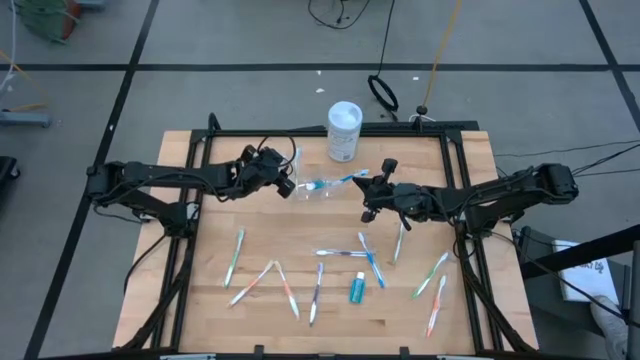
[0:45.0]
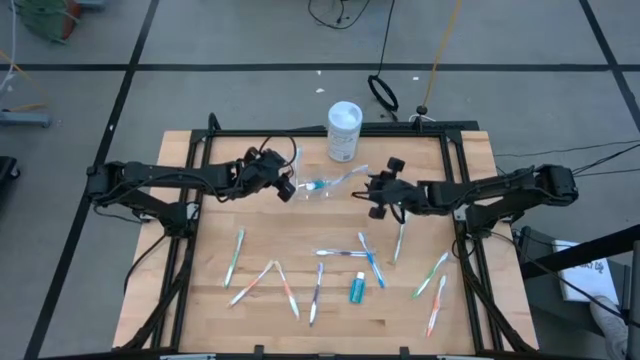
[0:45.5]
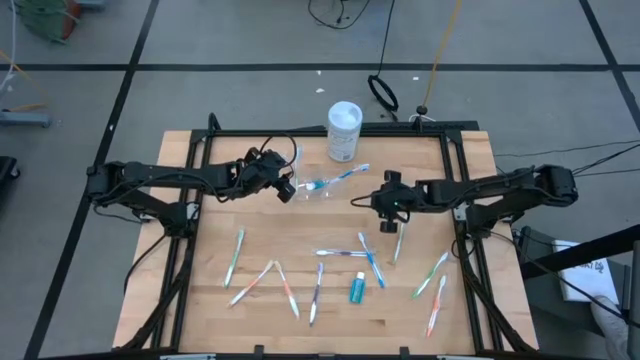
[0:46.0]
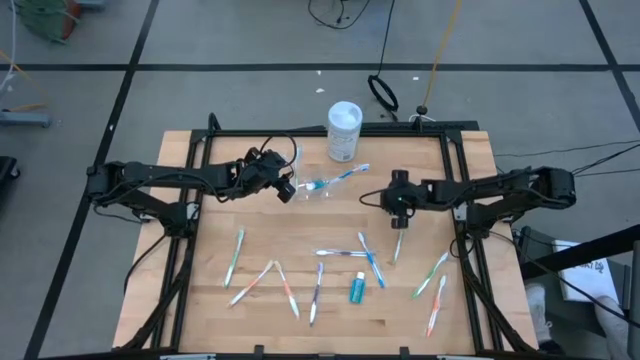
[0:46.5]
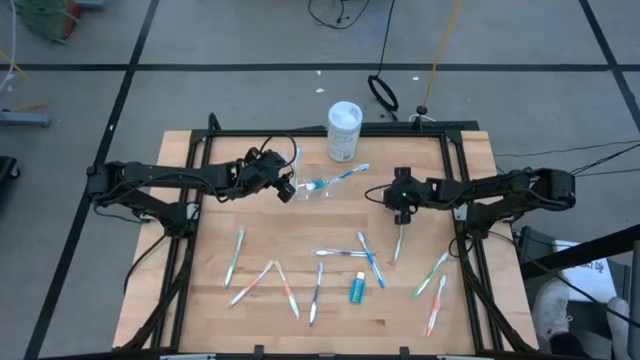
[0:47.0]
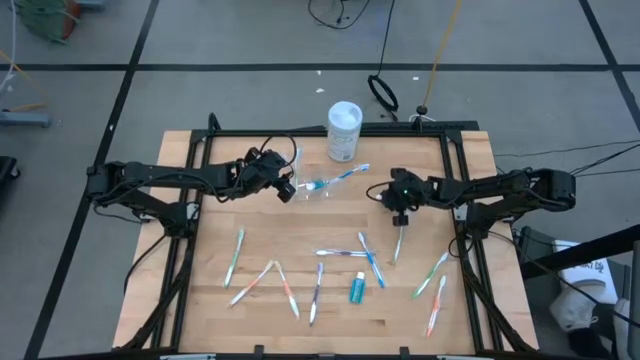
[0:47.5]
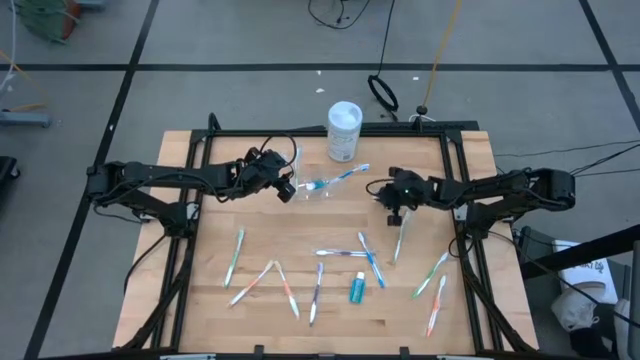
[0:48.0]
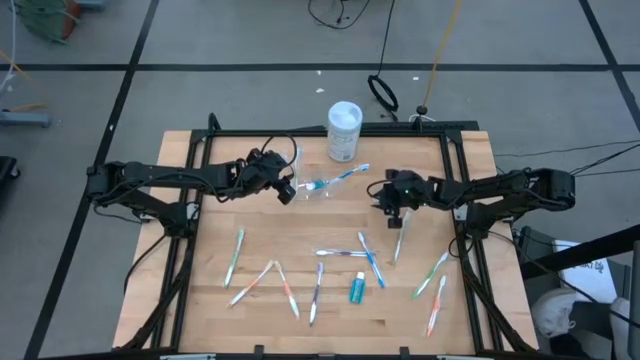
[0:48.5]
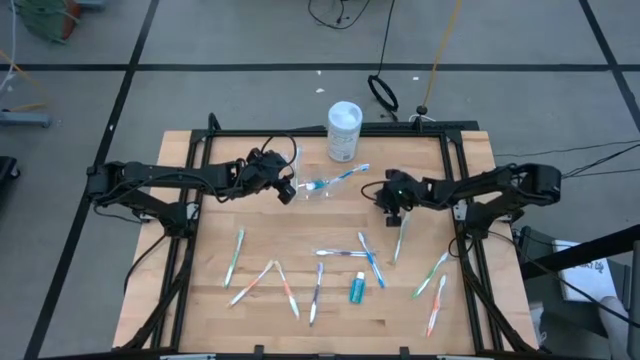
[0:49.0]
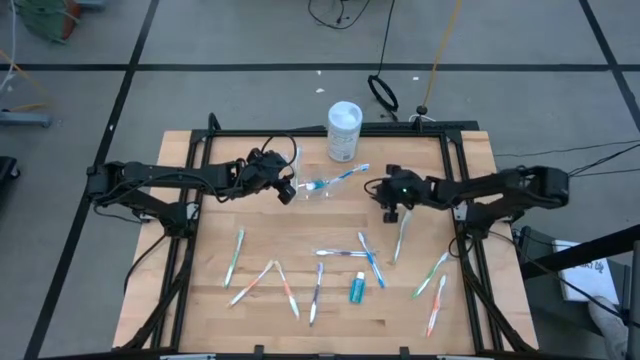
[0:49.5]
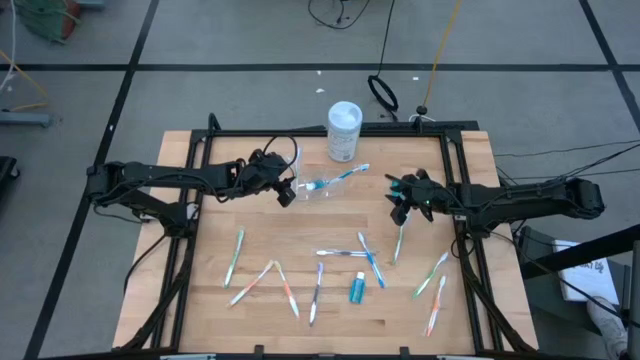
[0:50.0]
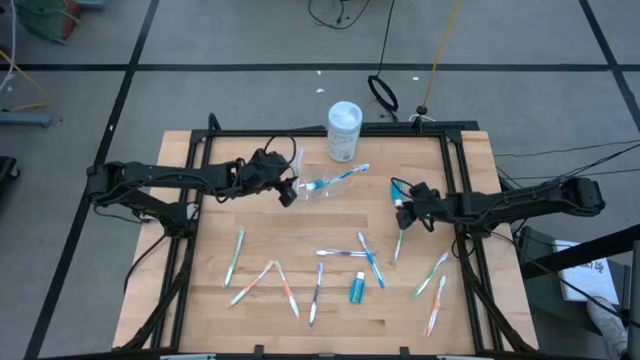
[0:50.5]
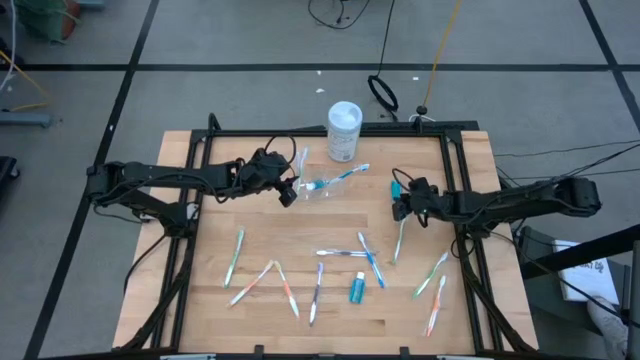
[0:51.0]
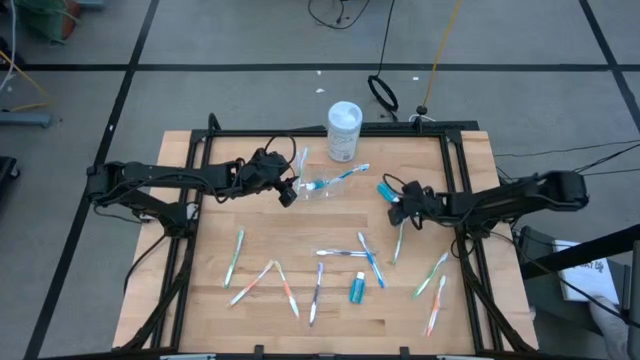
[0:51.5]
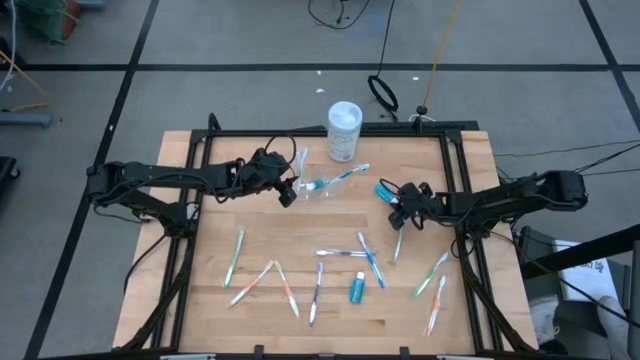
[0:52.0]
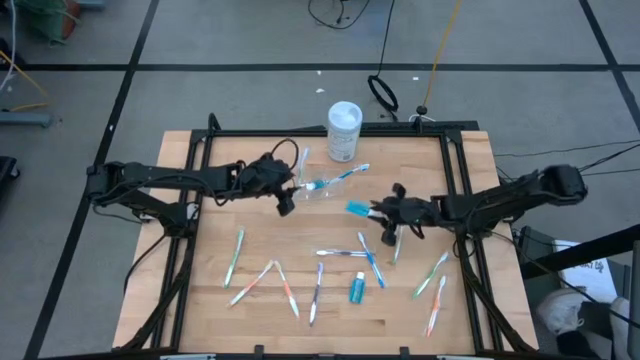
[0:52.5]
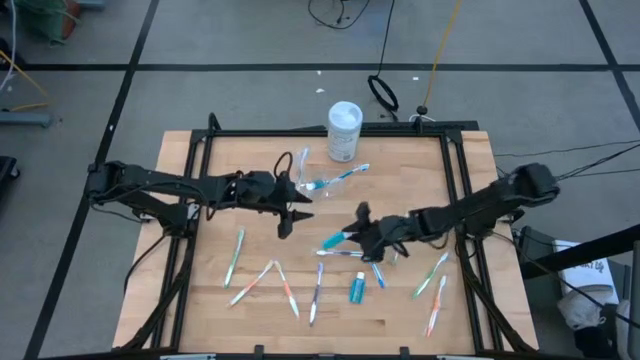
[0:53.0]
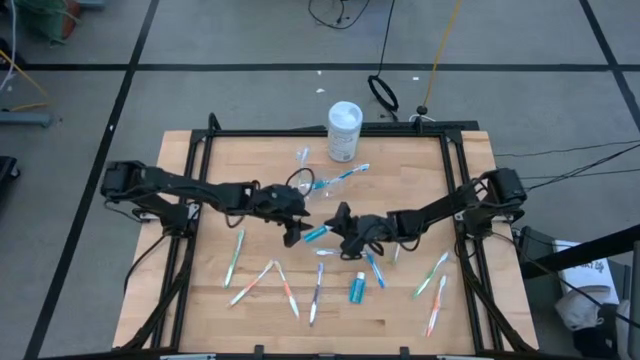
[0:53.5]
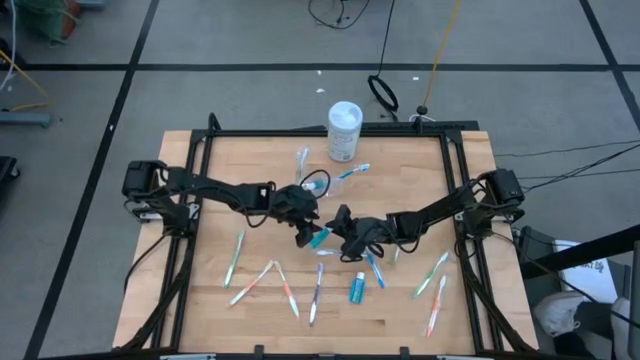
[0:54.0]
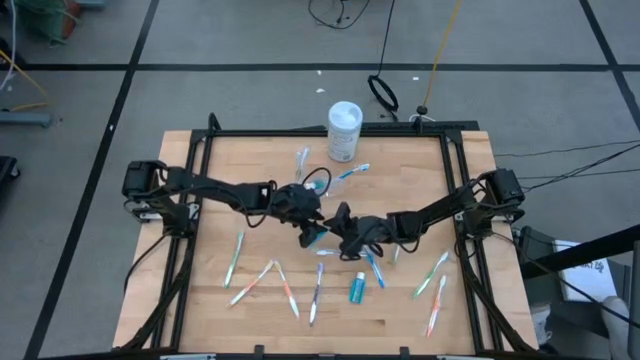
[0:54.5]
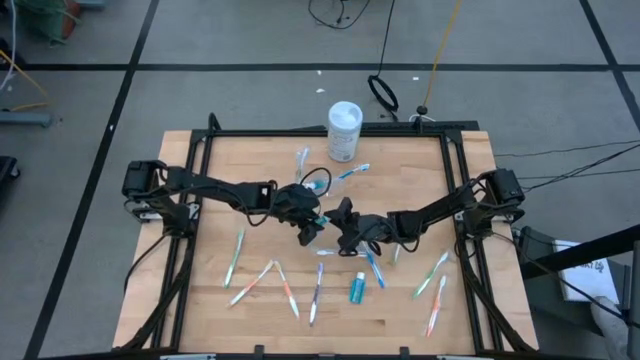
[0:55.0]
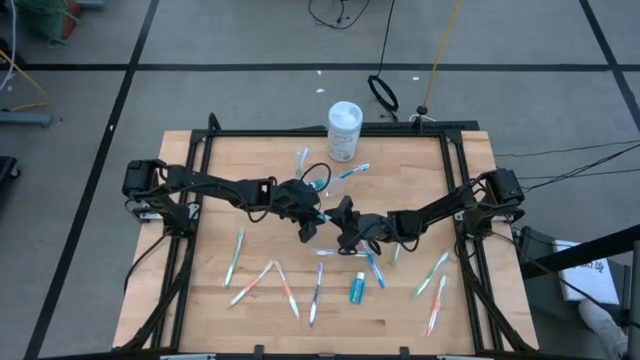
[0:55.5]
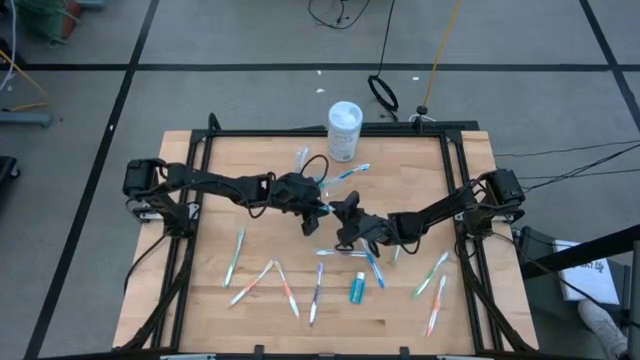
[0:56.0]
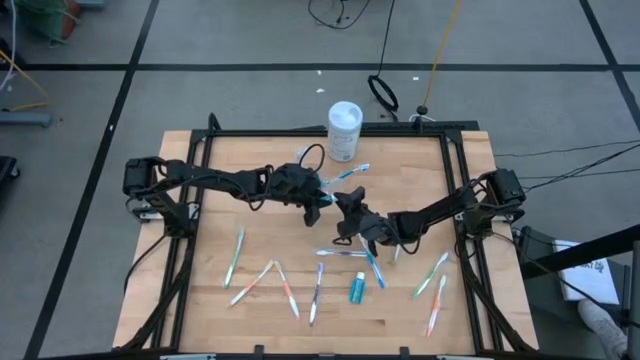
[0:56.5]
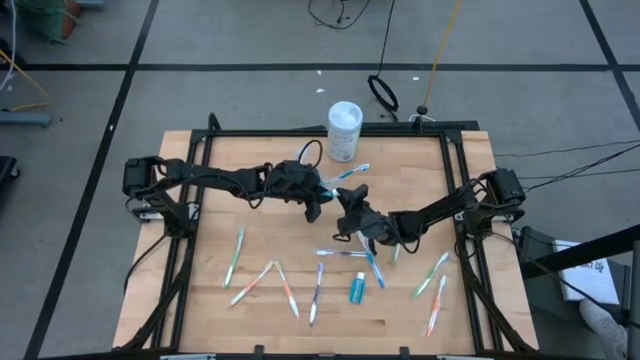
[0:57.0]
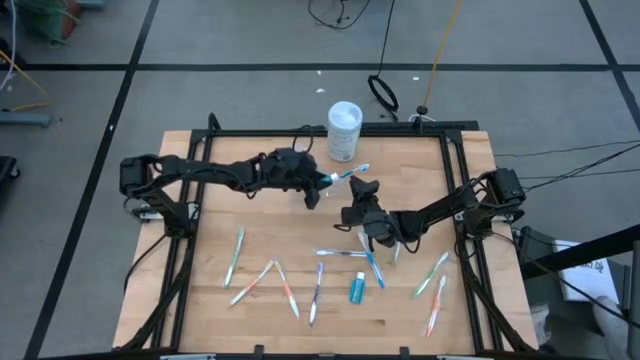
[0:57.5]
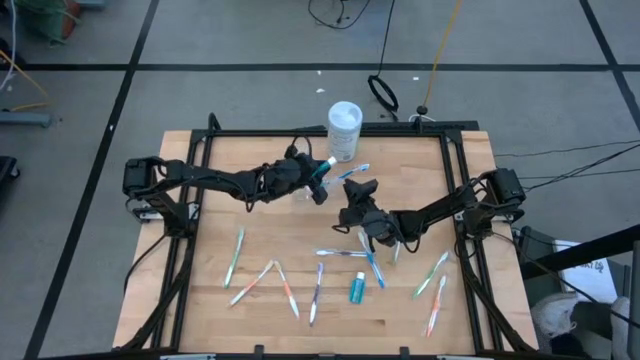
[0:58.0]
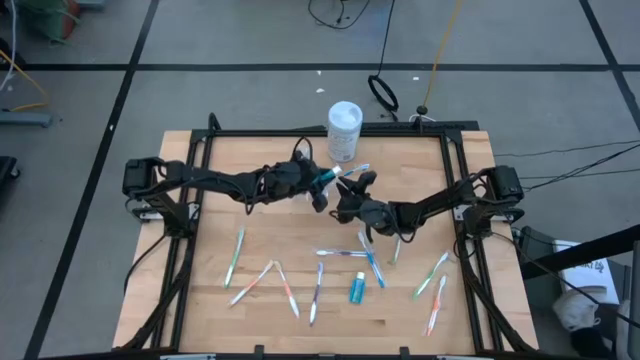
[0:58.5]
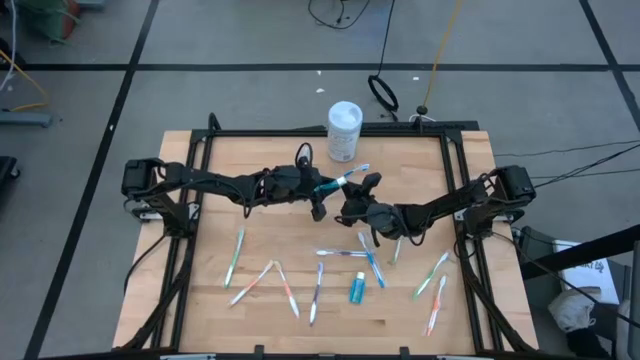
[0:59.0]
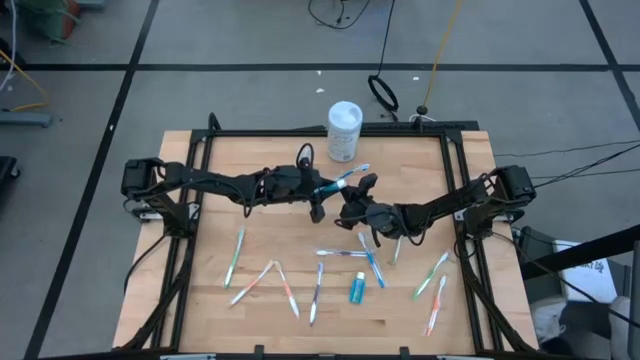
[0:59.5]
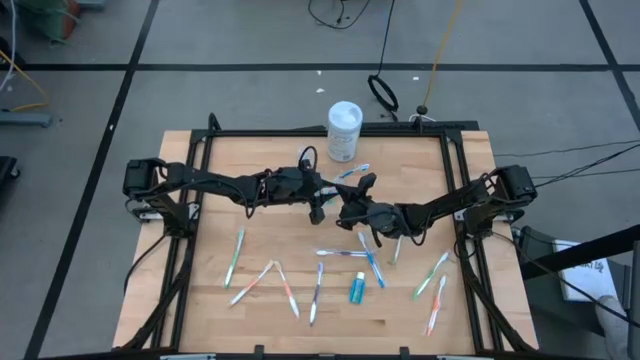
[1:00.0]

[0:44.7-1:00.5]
Task: Pick & Place toothbrushing station
Put the blue mouthwash into the transparent organizer

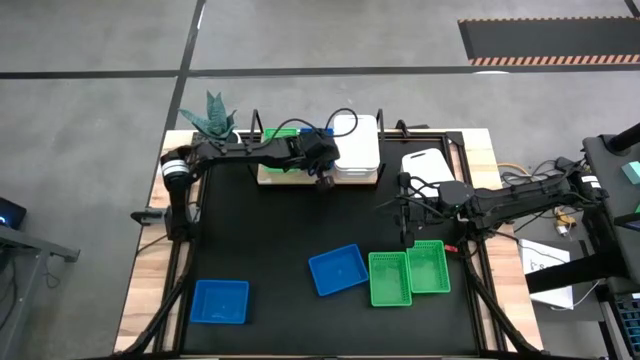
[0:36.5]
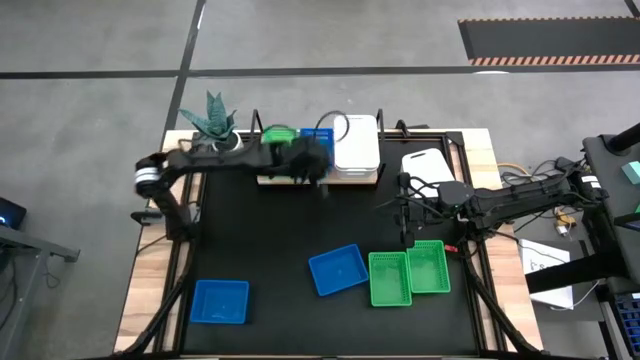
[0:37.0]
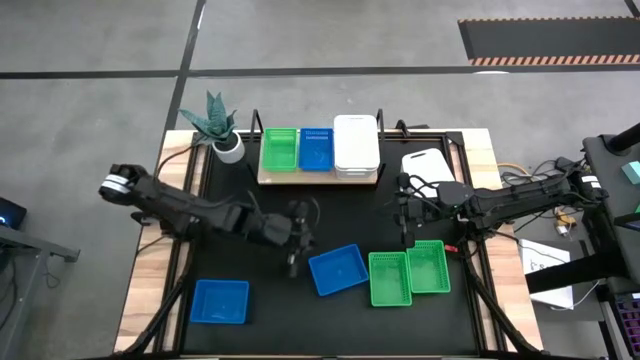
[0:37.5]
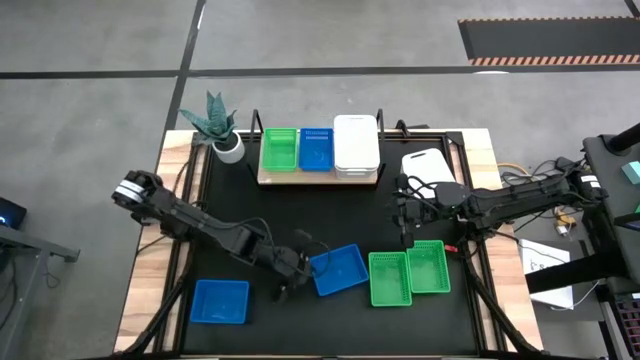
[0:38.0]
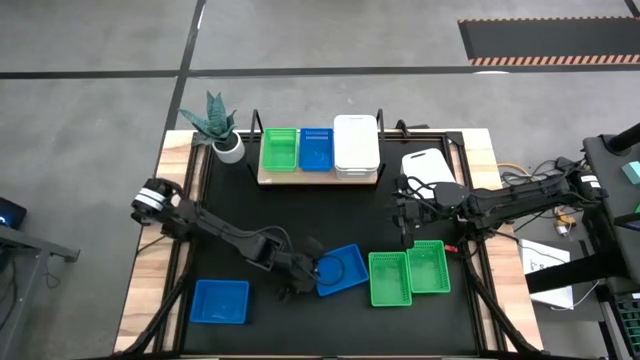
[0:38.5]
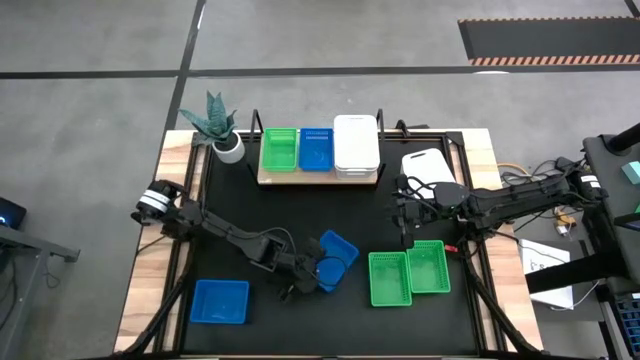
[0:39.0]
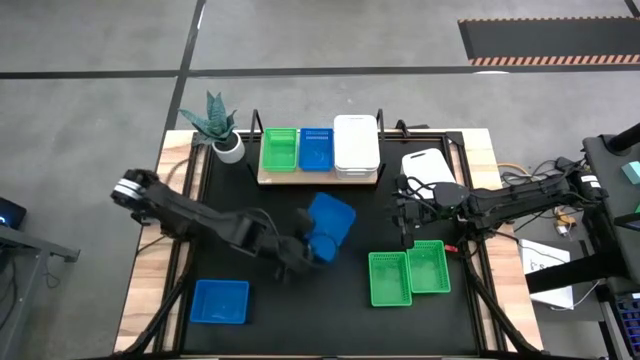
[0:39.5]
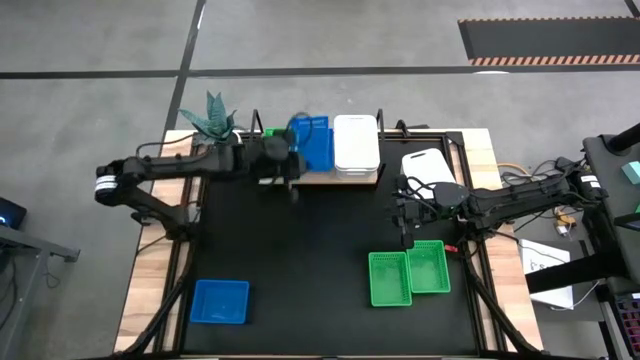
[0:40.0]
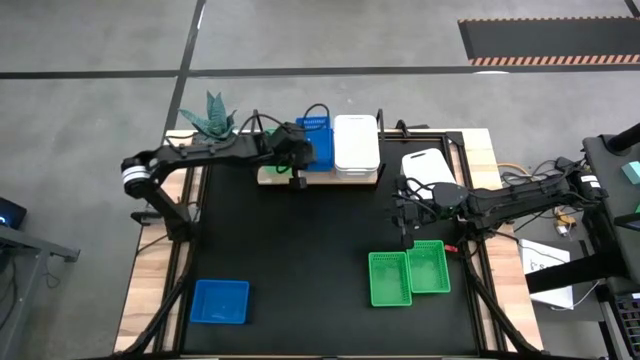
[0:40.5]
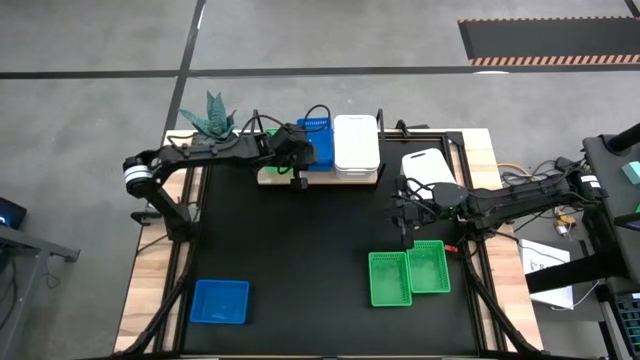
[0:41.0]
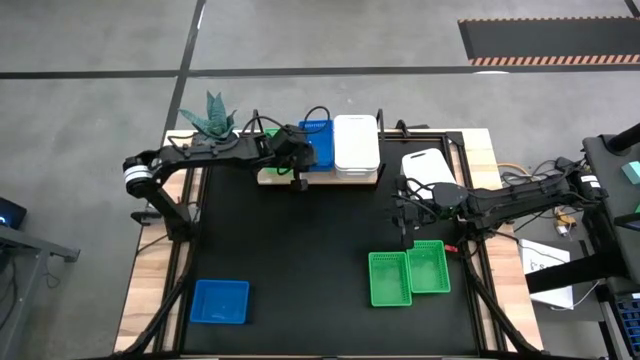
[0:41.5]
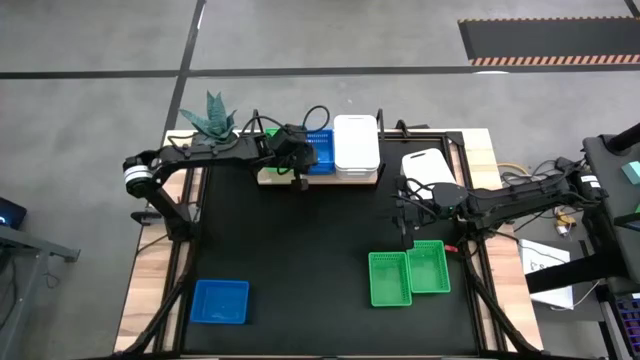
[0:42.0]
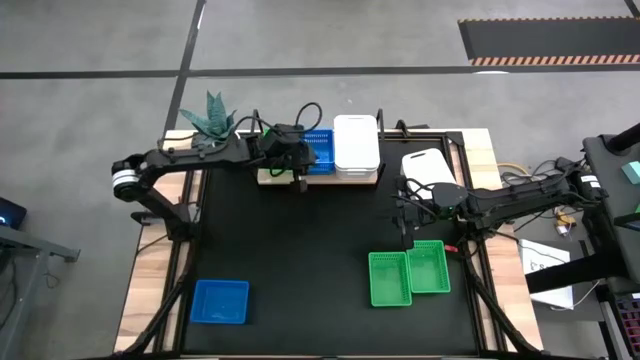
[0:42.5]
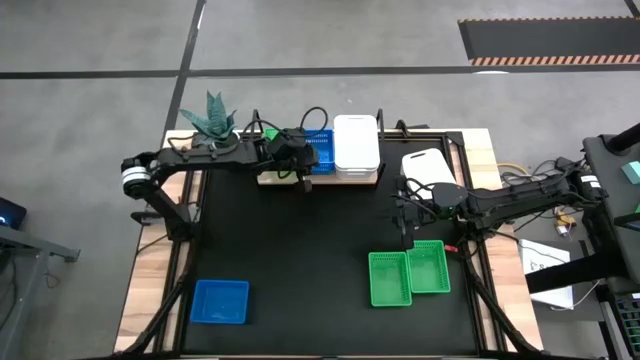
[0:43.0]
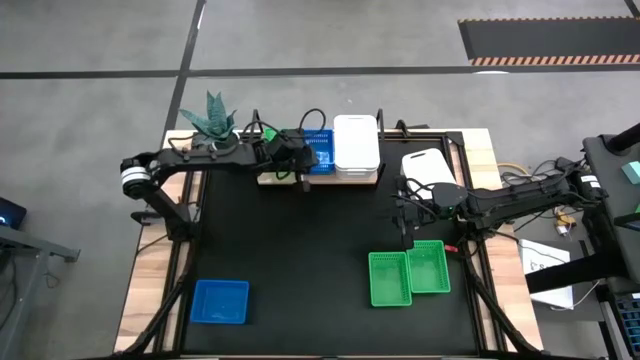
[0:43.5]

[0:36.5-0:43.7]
Task: Stack baskets on shelf by color
Stack the right blue bin on top of the blue bin on the shelf
